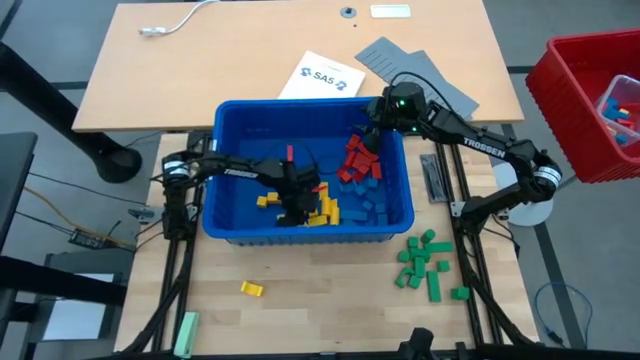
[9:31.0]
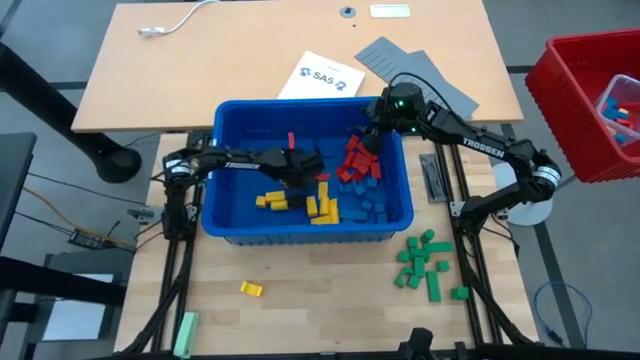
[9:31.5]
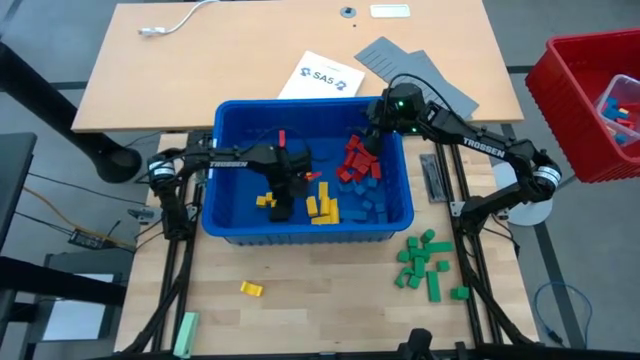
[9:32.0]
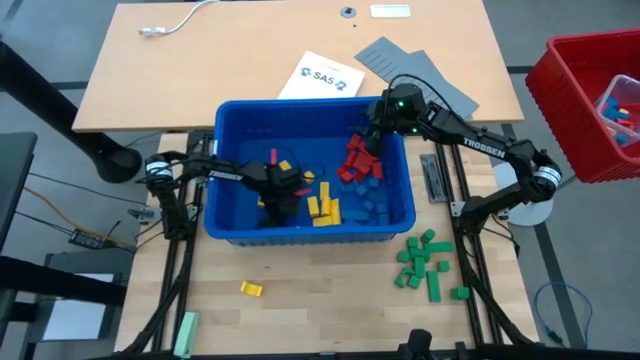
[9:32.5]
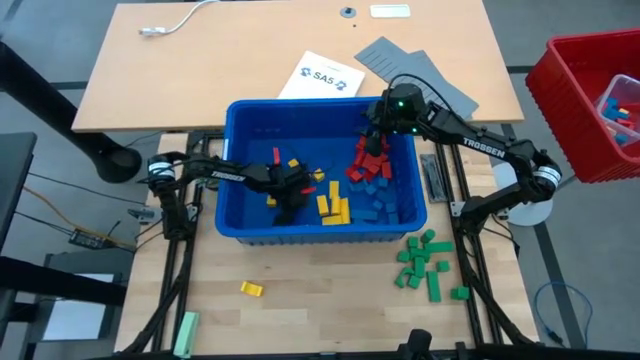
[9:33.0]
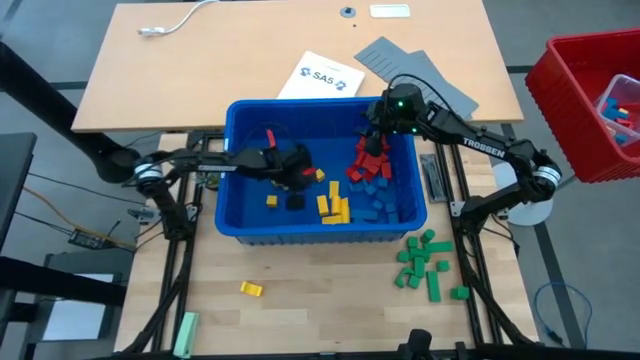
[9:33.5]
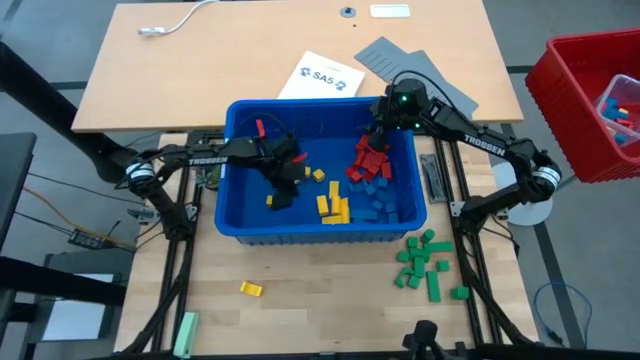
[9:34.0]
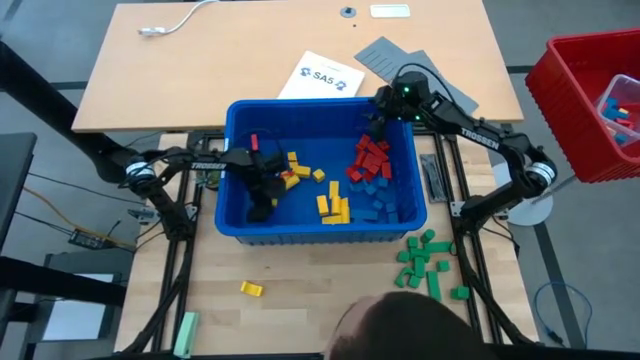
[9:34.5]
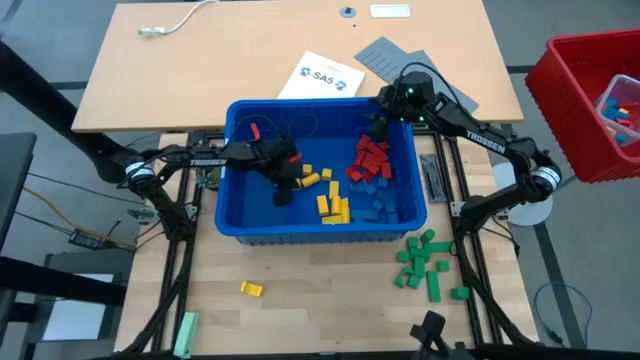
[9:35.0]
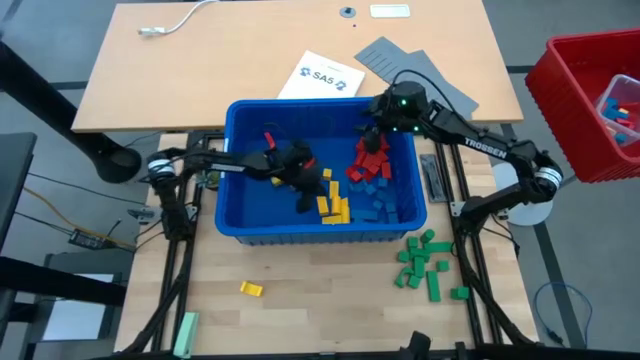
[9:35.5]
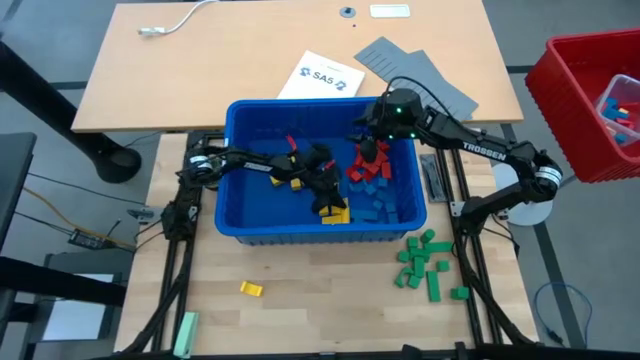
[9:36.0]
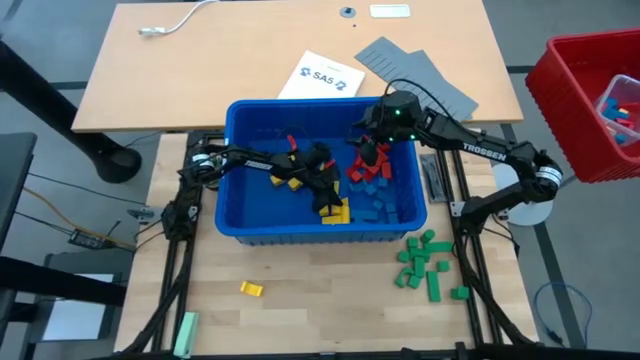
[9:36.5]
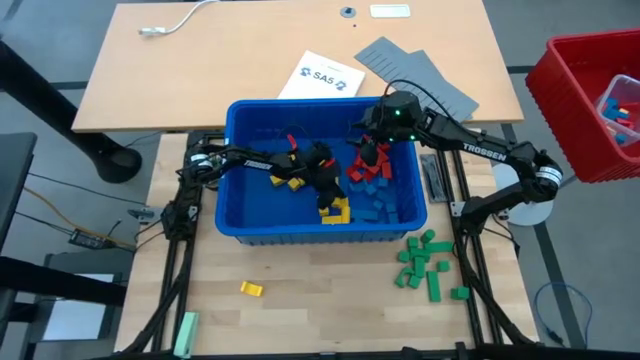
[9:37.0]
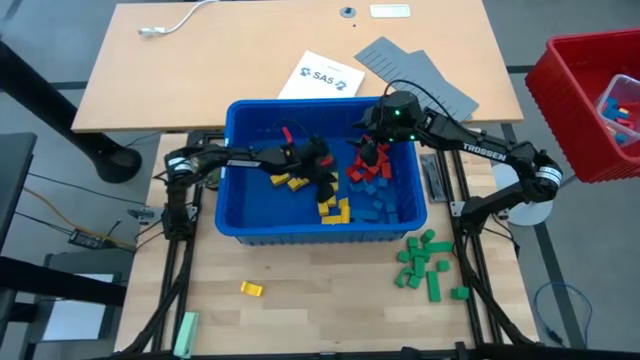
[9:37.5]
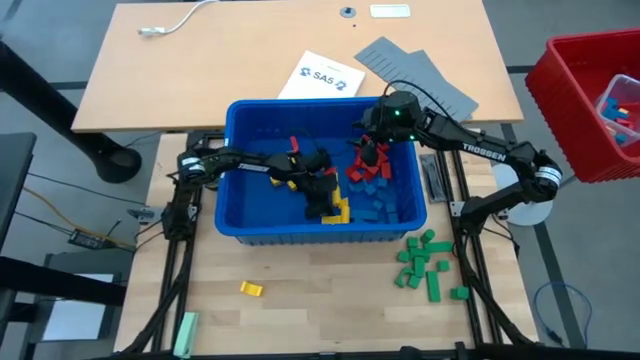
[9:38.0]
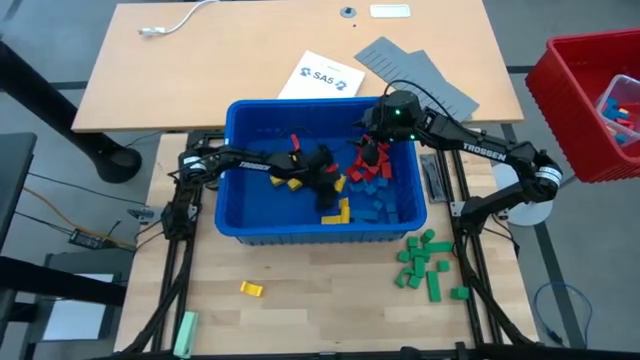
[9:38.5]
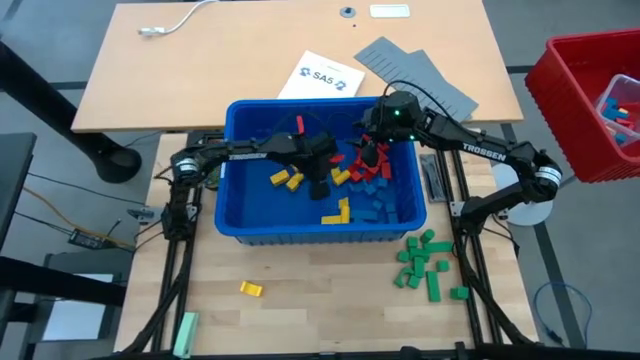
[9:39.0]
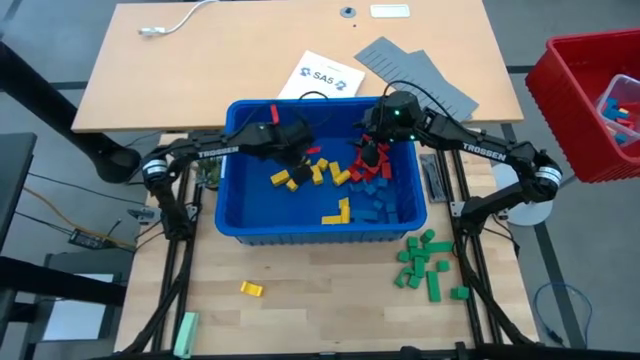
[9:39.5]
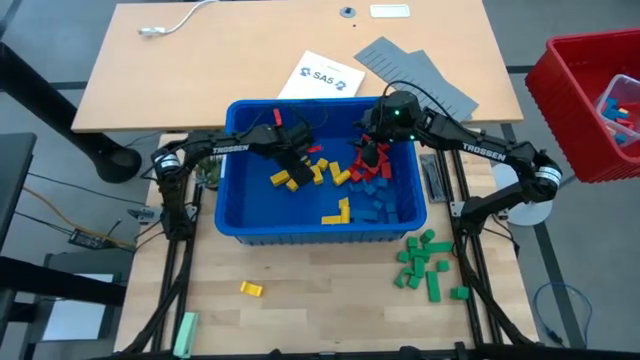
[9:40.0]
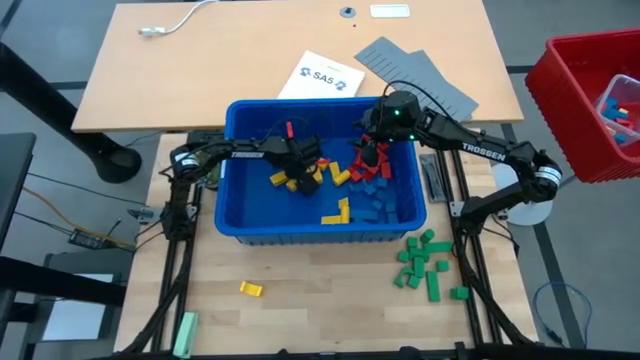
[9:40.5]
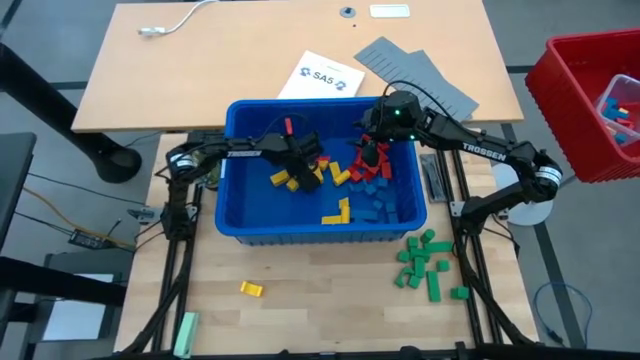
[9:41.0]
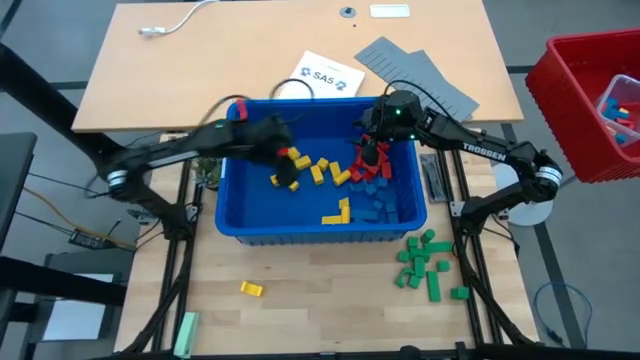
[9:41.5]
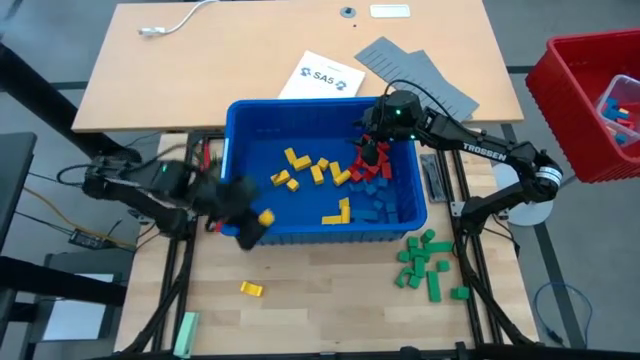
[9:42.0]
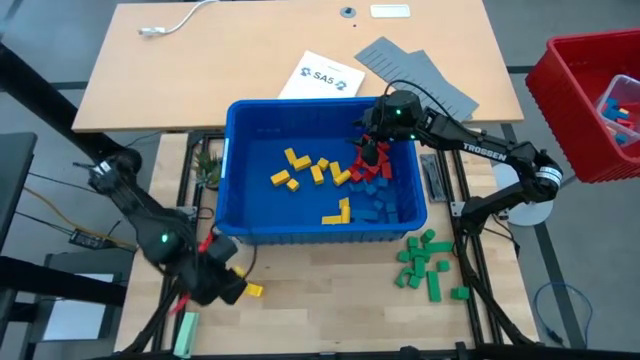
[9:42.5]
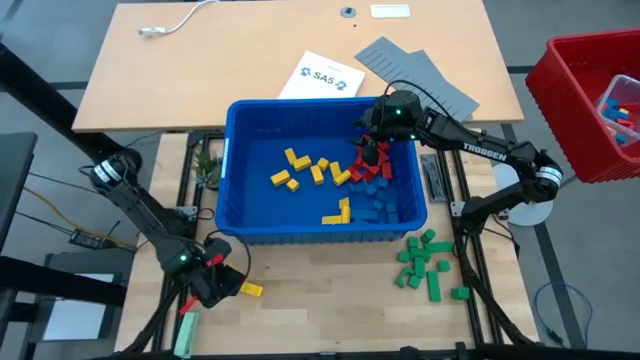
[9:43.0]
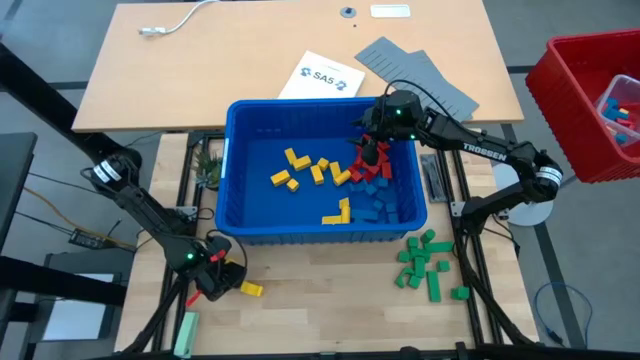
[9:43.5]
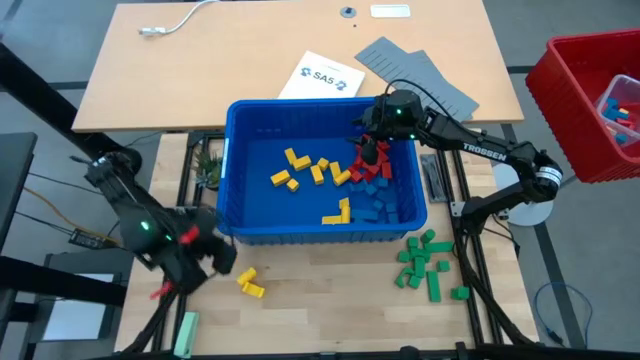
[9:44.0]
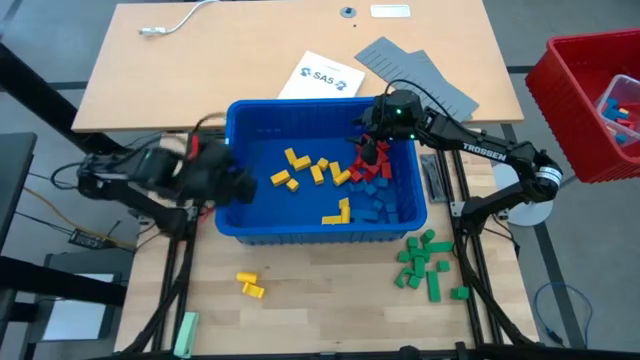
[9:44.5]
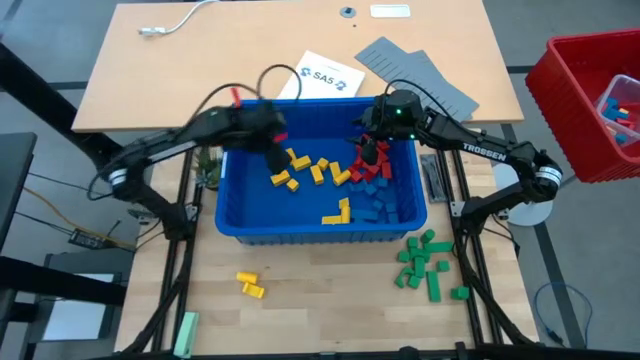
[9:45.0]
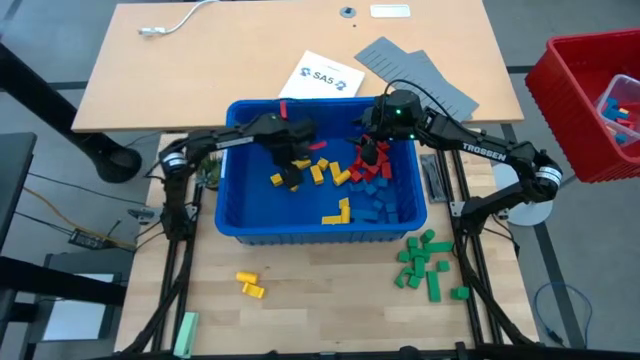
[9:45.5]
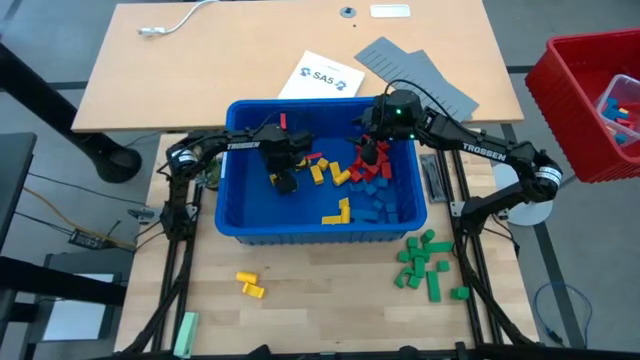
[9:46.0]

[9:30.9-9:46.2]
Task: Sort blocks
Remove the yellow block from the blue bin

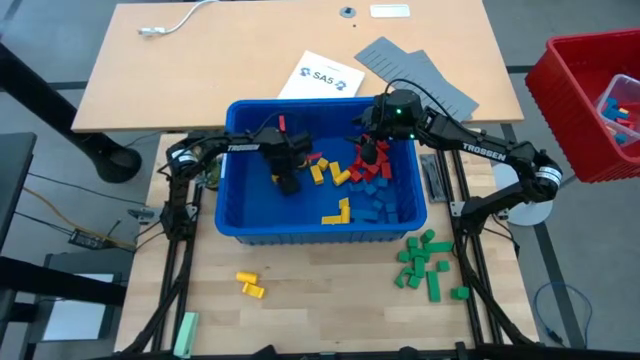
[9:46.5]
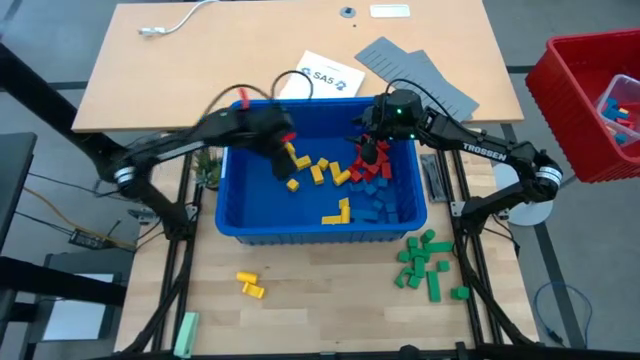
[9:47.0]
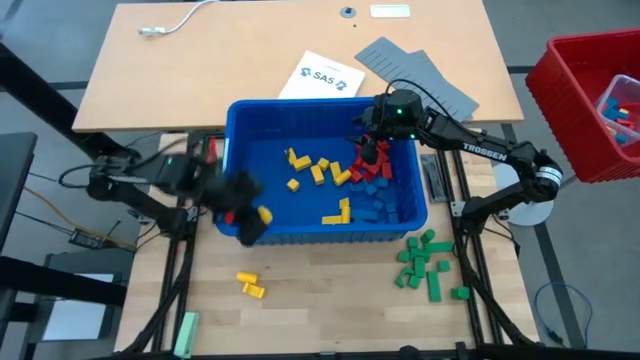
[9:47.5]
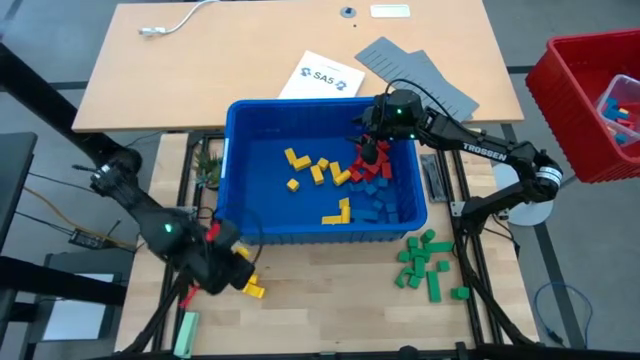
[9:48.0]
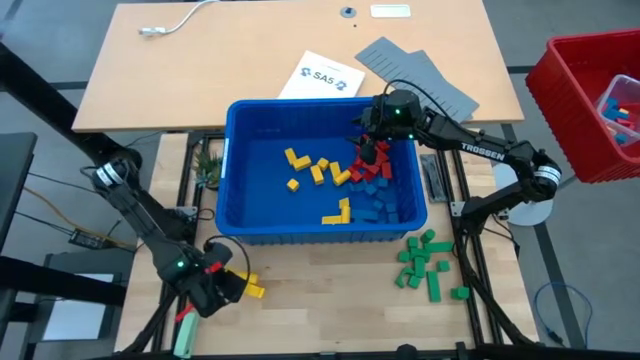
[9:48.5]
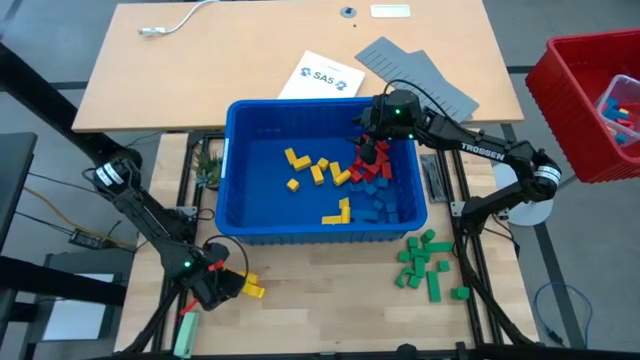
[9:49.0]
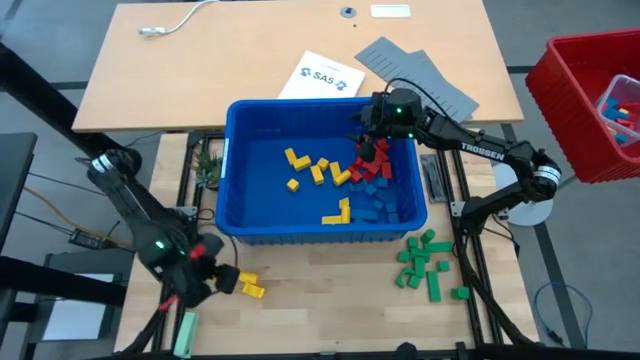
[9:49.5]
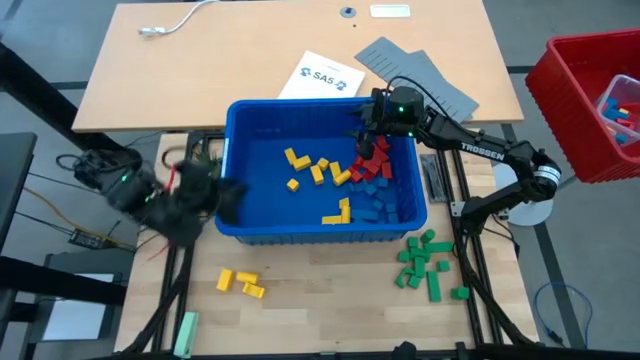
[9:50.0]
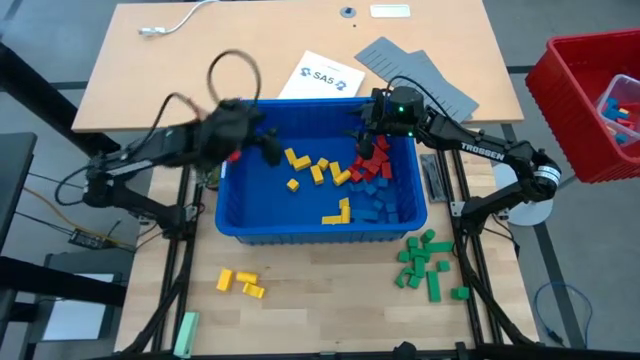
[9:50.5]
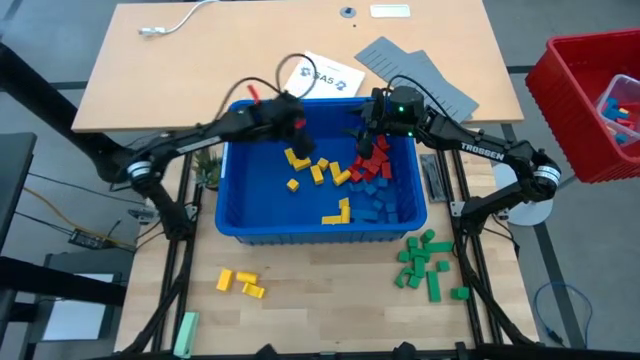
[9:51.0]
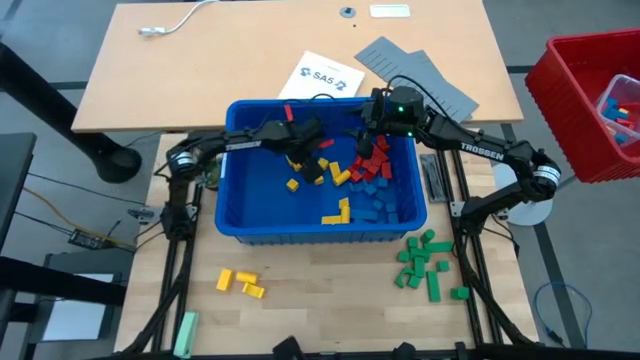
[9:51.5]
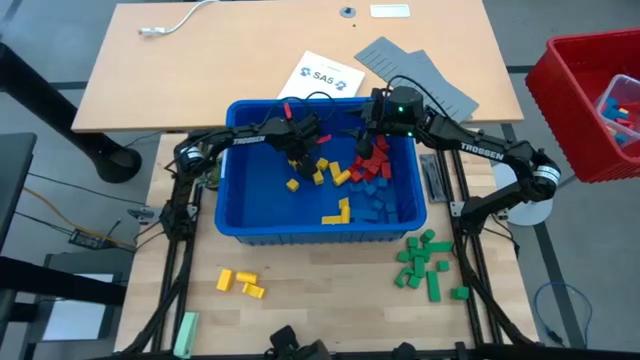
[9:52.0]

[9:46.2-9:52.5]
Remove the yellow block from the blue bin
